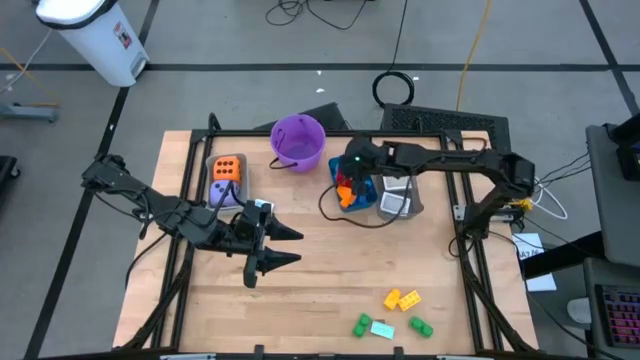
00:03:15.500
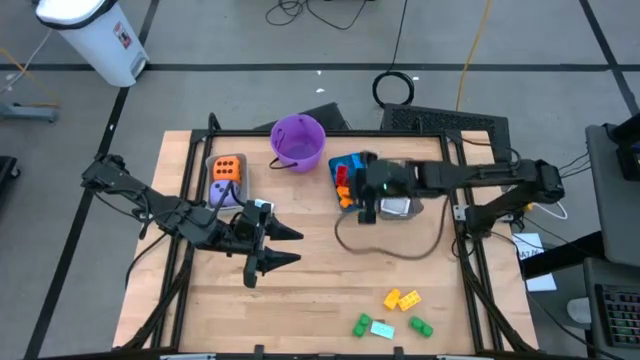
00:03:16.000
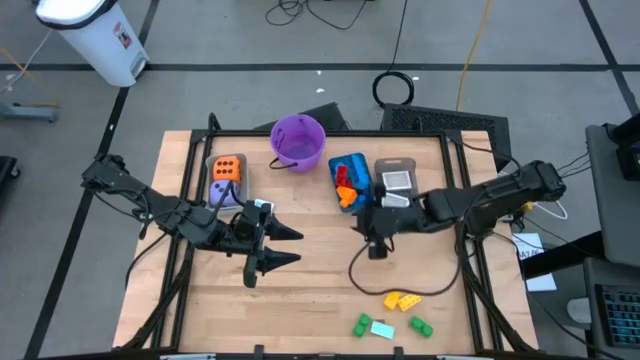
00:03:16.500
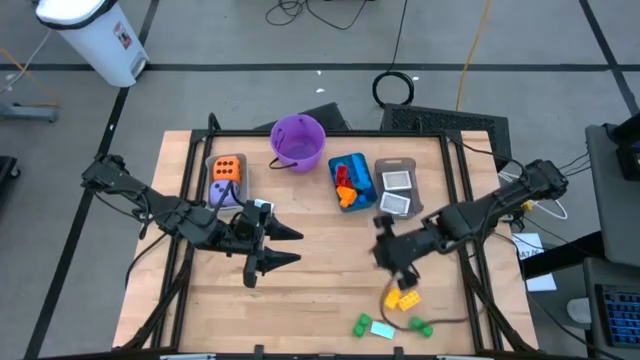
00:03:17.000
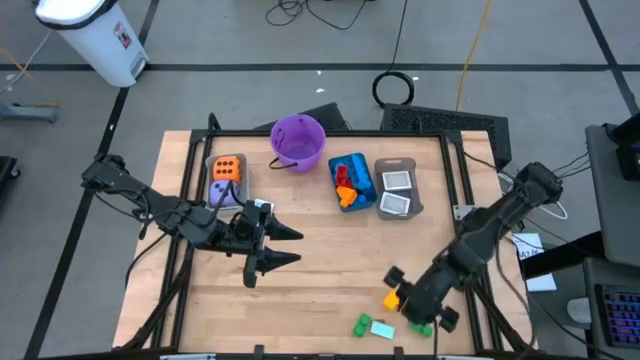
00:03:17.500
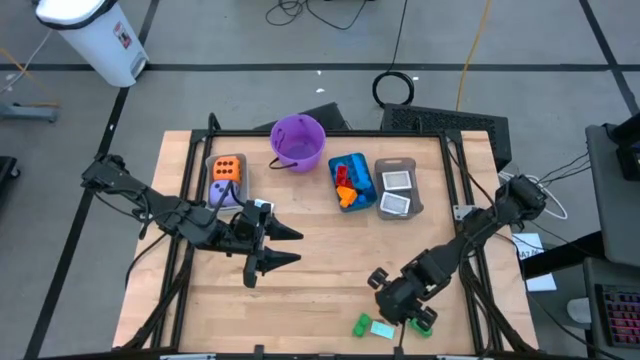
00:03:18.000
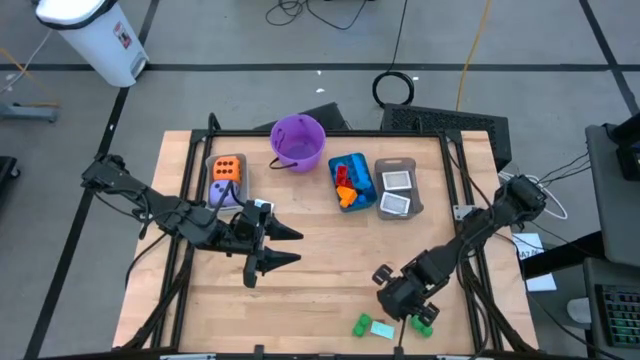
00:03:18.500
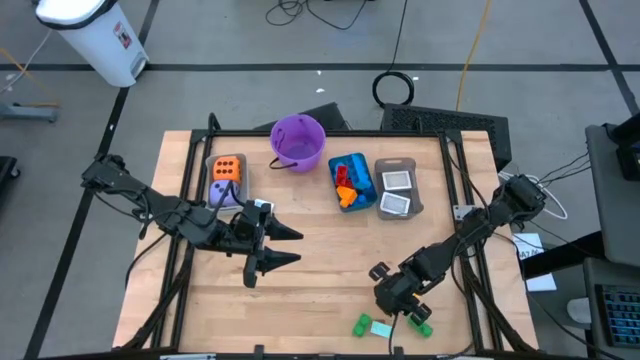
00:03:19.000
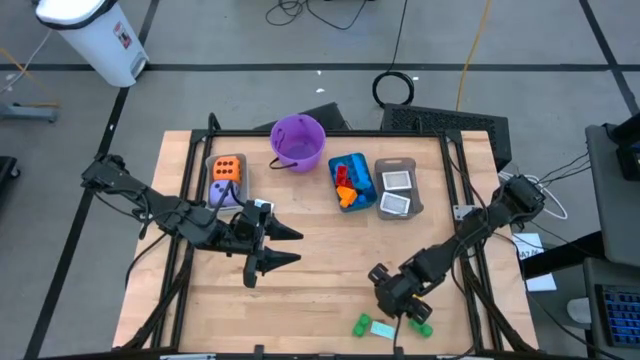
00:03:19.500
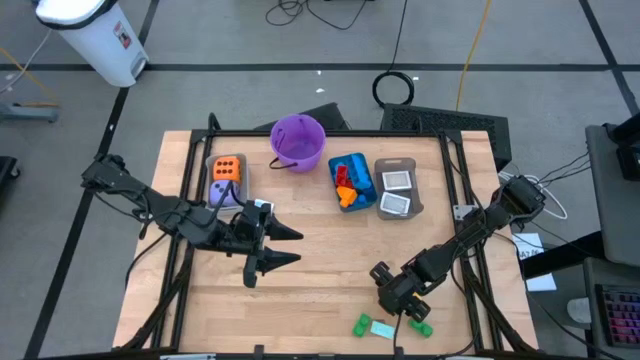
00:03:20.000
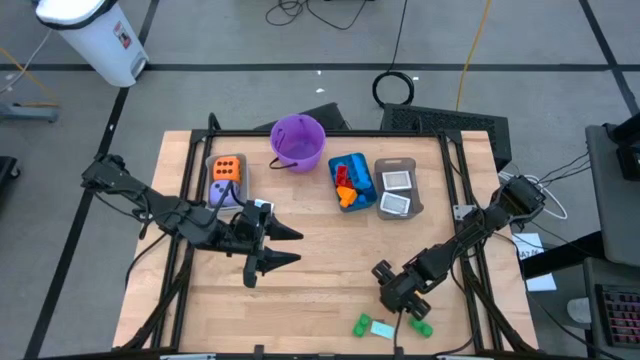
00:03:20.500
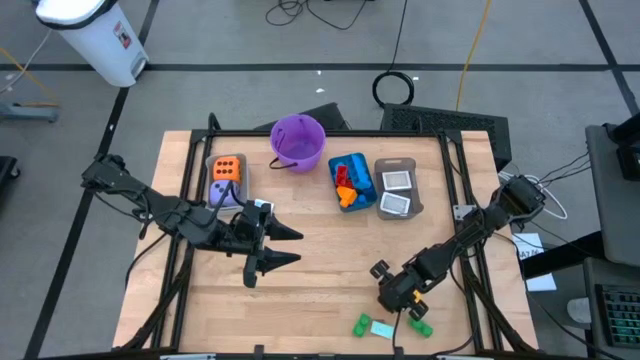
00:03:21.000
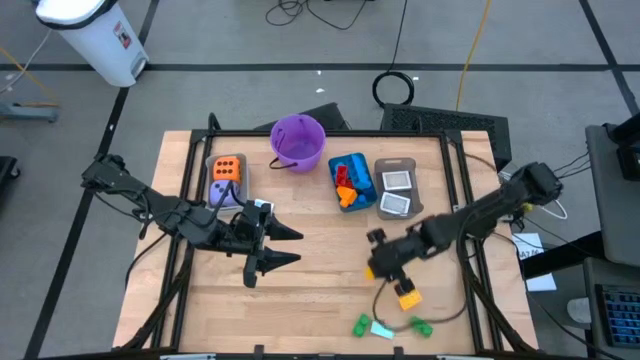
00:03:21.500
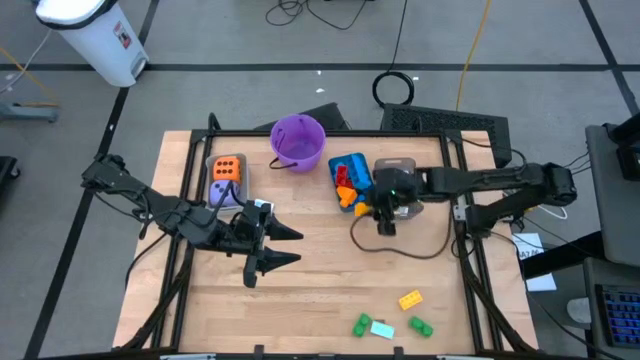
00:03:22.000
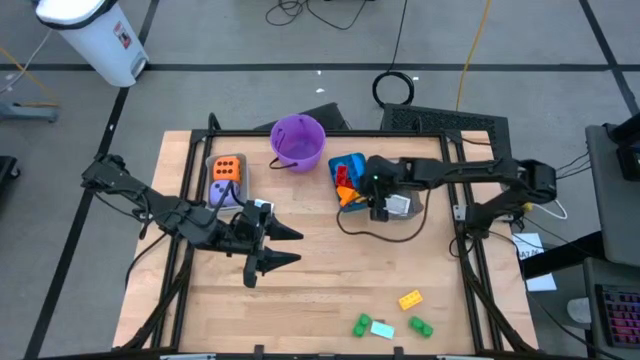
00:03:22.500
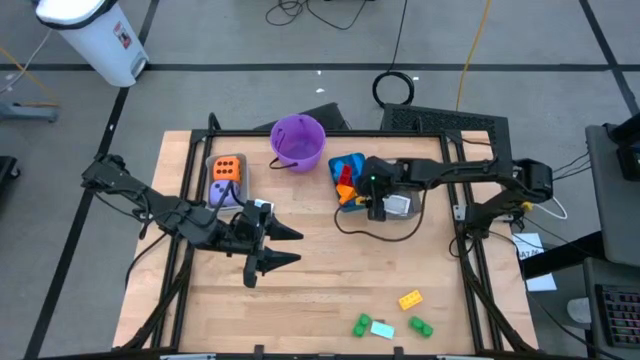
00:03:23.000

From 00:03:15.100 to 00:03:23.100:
Task: Pick & Place Toys
Put the yellow game piece into the blue bin

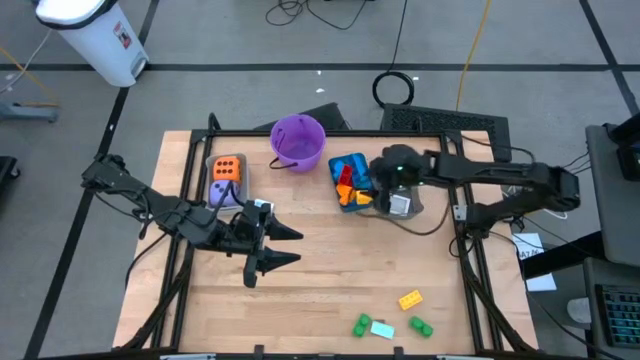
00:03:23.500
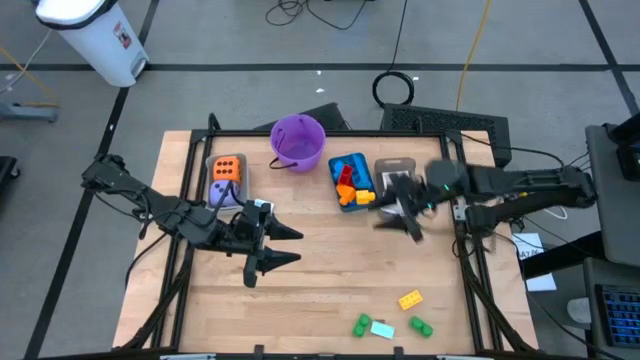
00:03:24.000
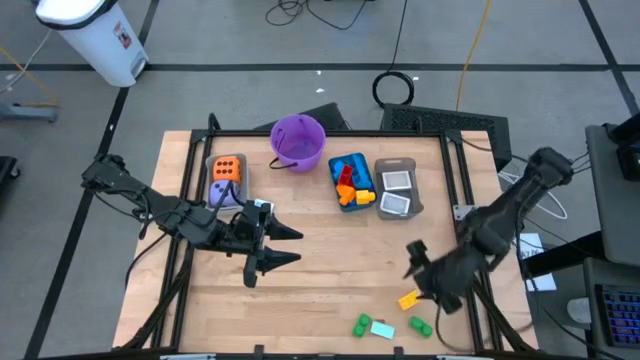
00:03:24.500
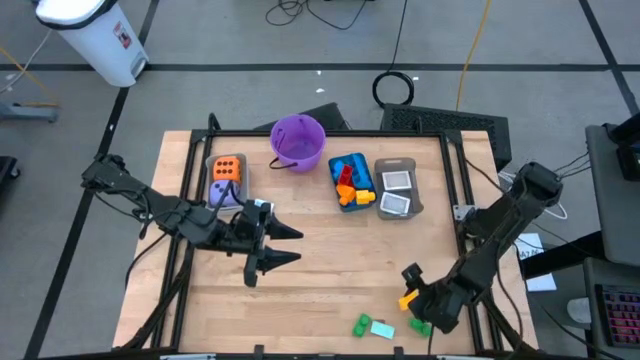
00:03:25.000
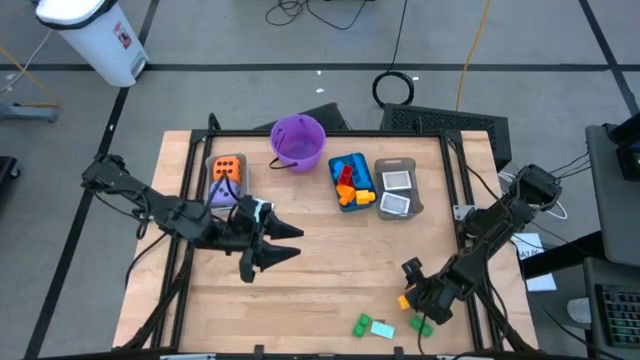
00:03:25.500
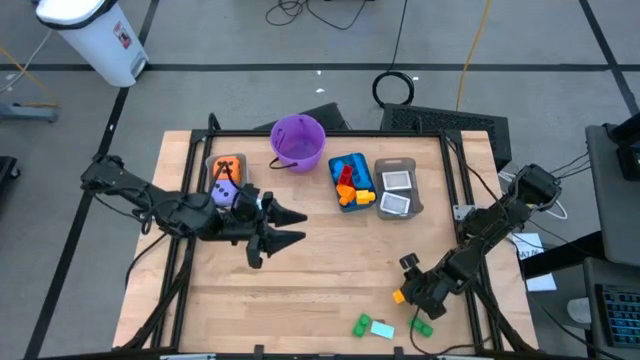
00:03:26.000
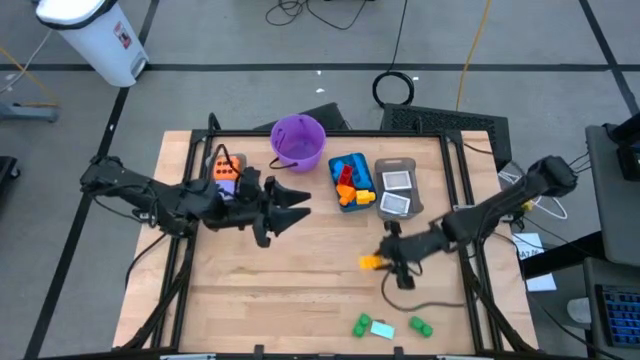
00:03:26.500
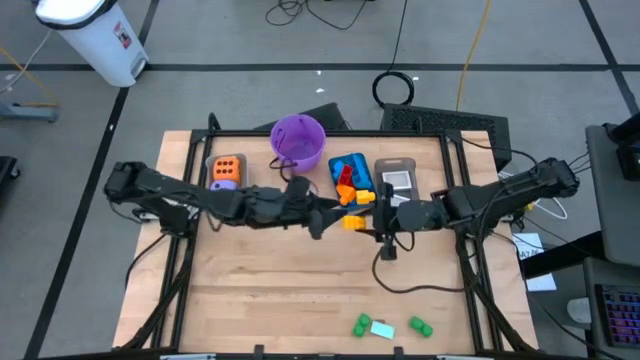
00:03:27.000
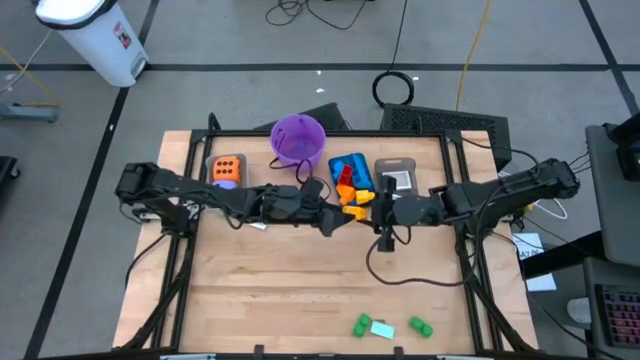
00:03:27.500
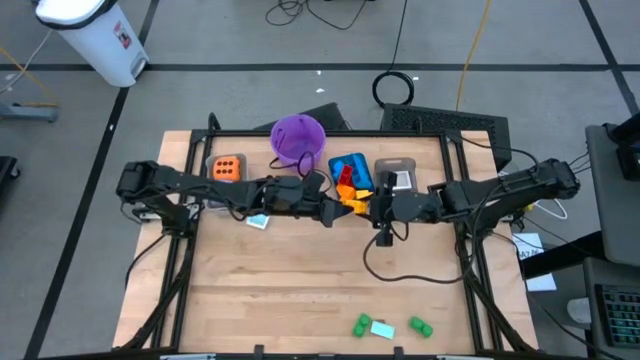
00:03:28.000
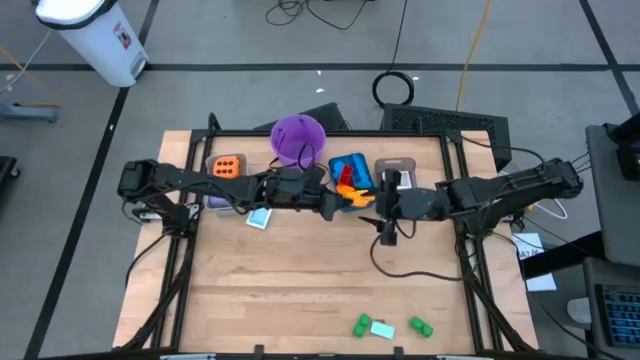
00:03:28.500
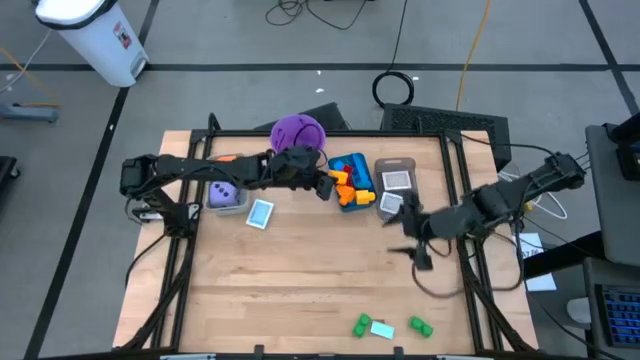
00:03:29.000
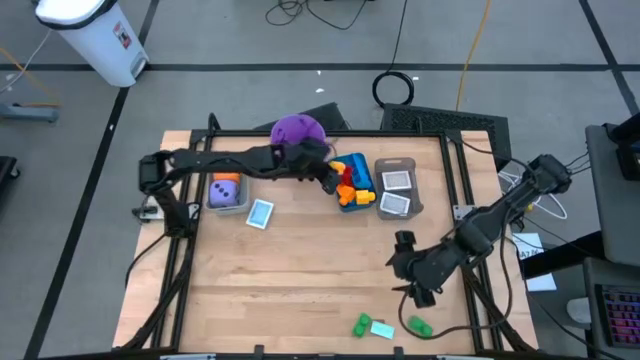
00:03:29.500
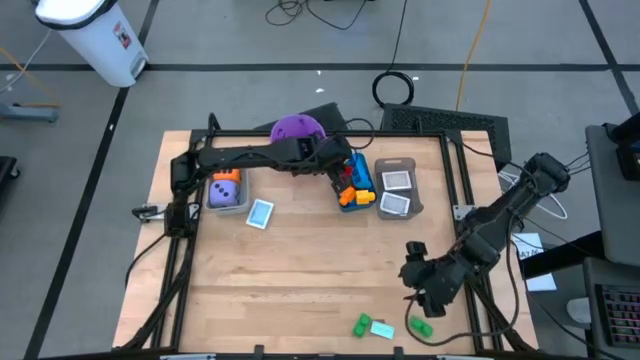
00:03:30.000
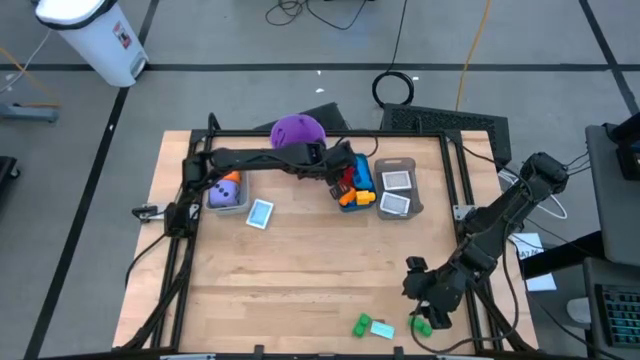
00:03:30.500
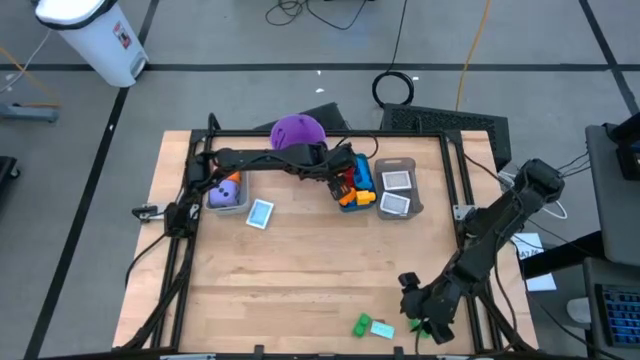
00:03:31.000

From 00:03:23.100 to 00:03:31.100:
Put the yellow game piece into the blue bin

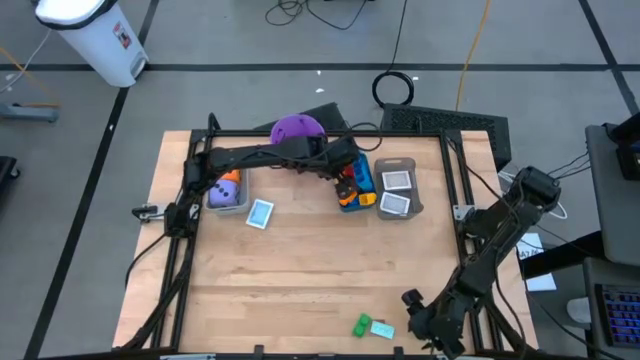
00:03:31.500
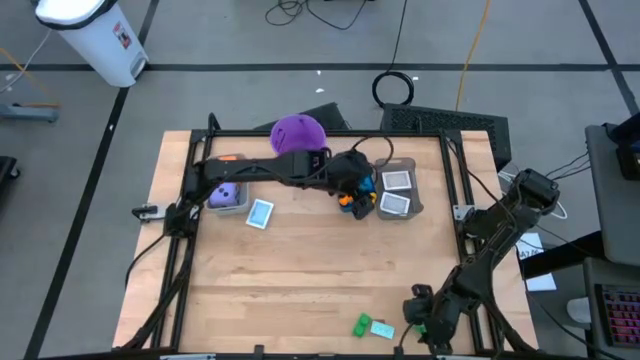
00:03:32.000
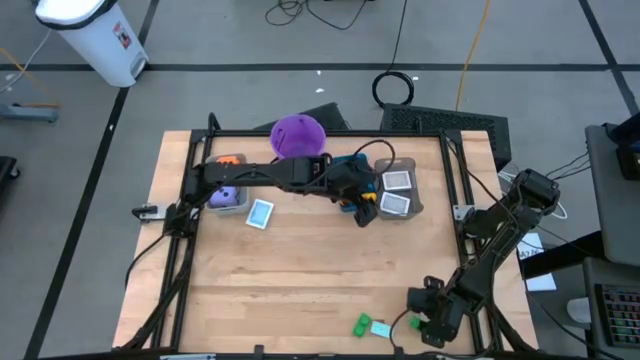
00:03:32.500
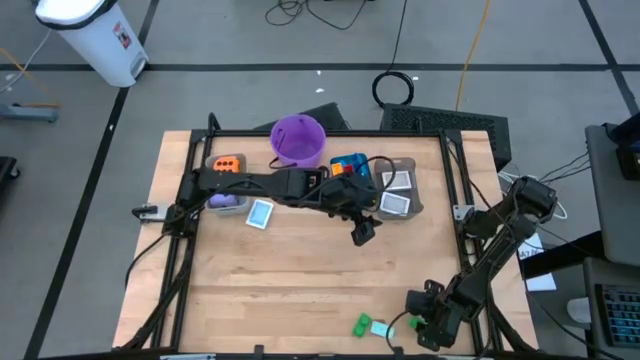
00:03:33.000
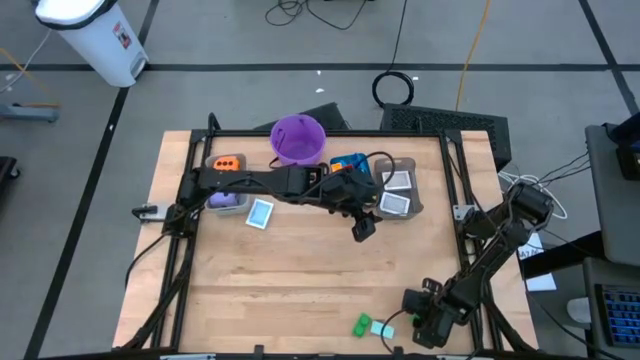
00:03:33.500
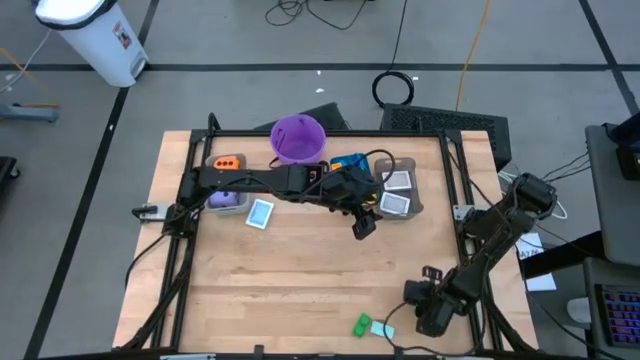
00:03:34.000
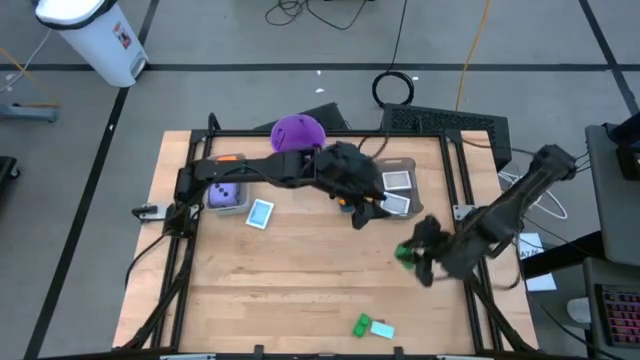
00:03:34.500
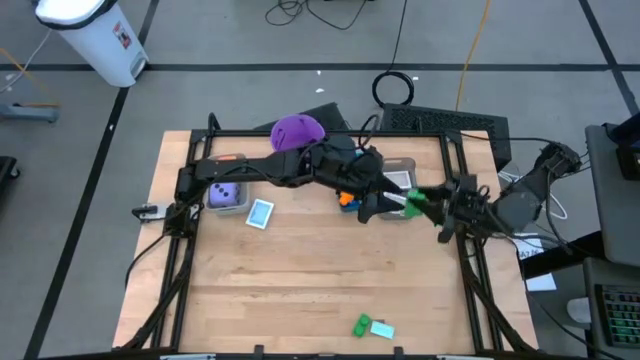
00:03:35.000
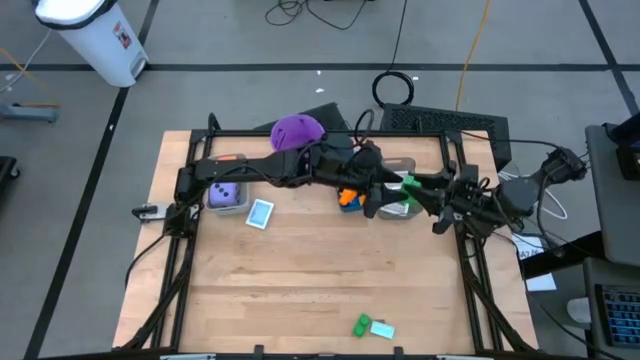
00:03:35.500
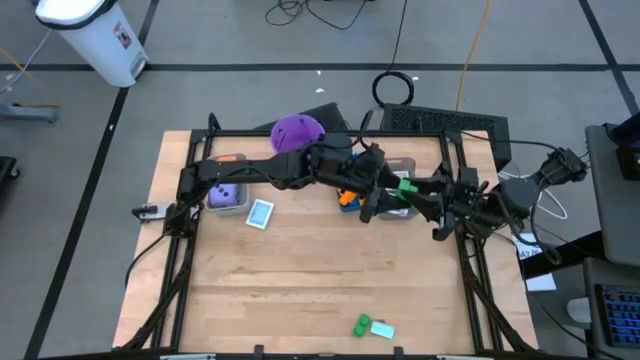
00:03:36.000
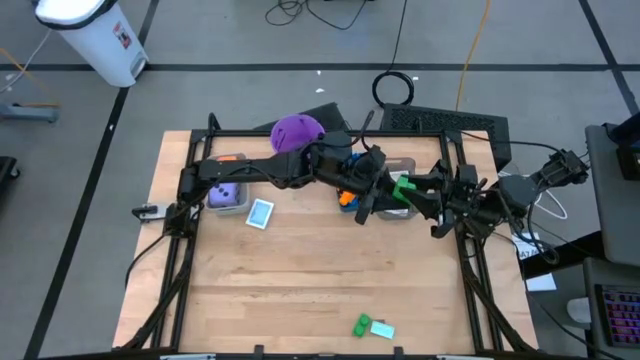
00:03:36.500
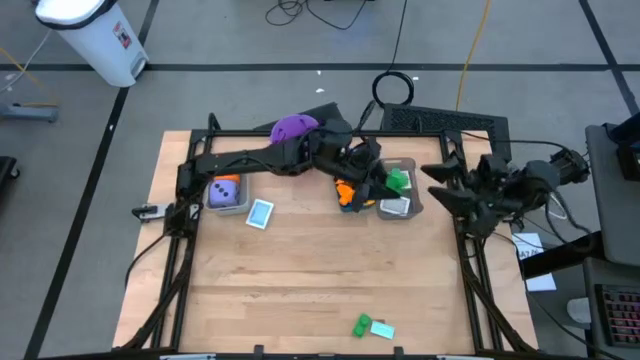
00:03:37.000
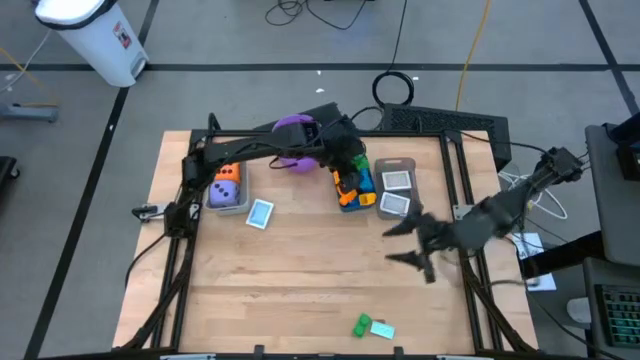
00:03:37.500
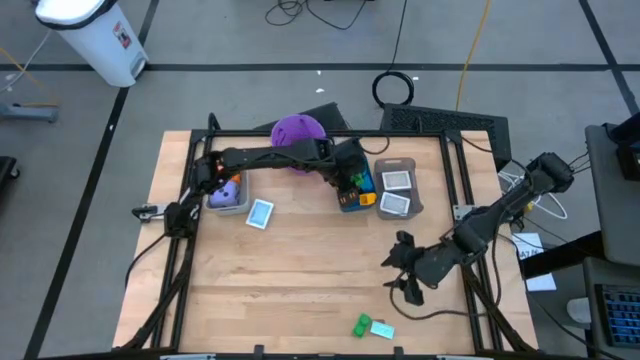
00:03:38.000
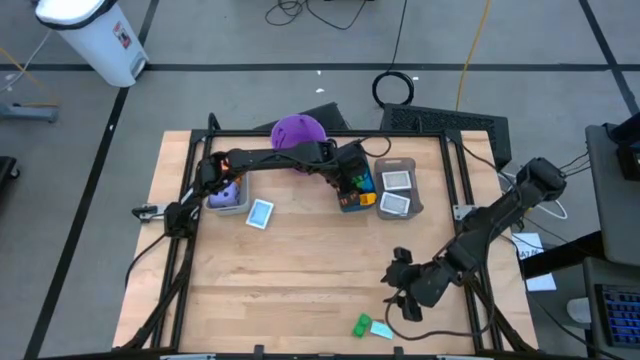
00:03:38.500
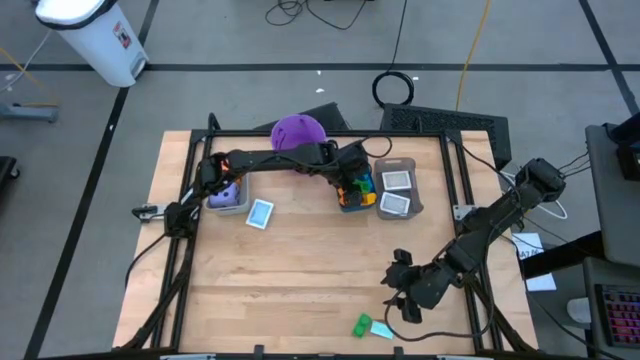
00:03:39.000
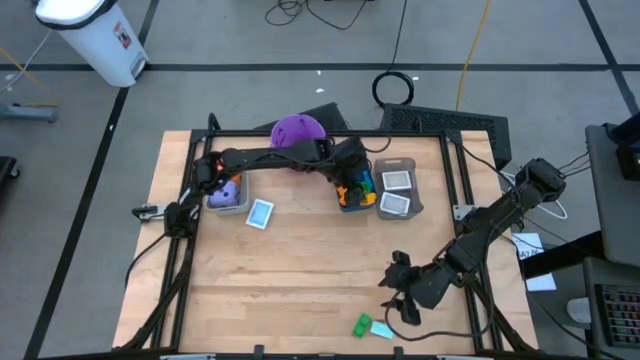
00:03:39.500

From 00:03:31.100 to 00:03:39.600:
Put the green game piece into the blue bin
